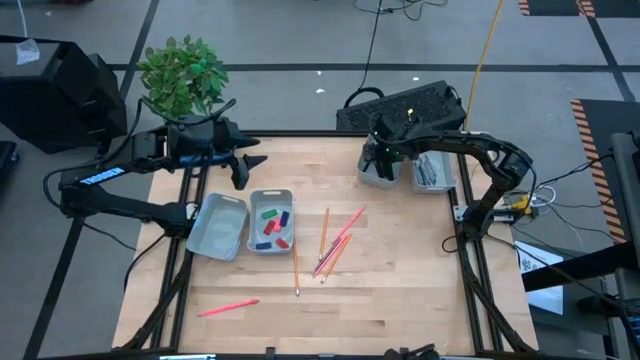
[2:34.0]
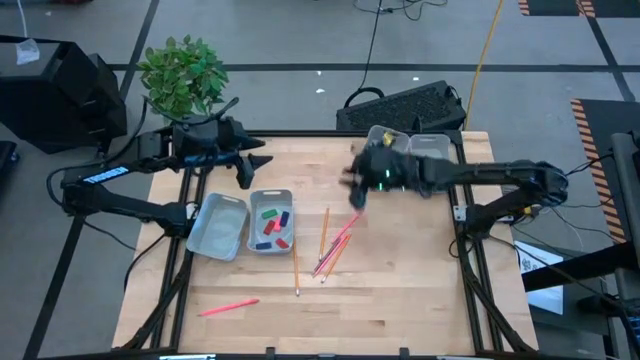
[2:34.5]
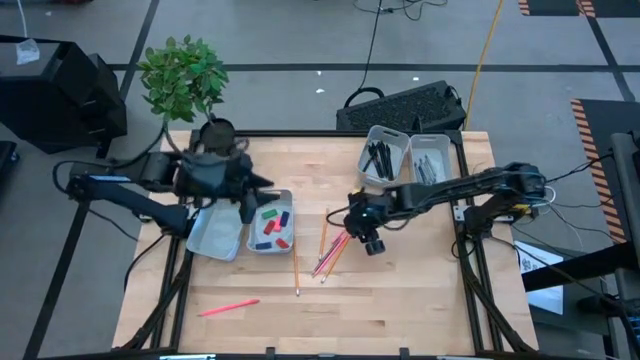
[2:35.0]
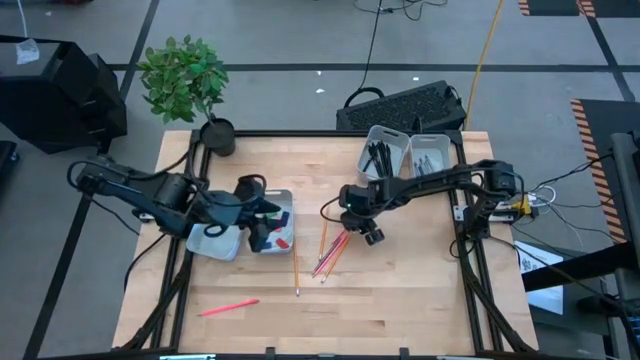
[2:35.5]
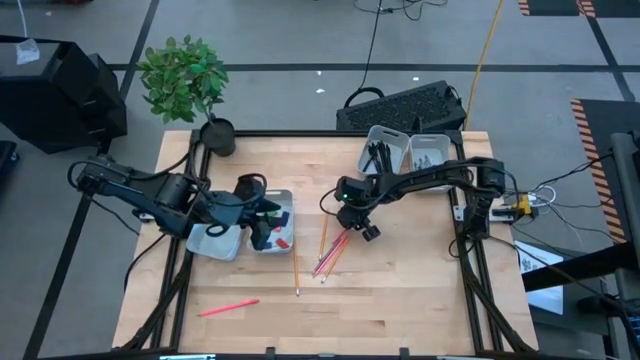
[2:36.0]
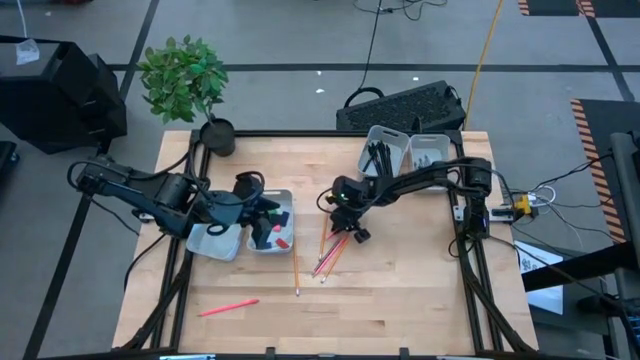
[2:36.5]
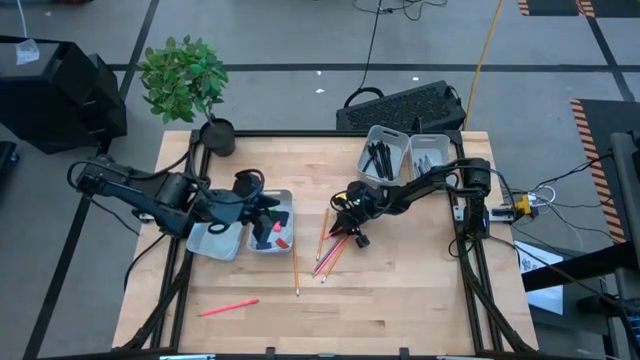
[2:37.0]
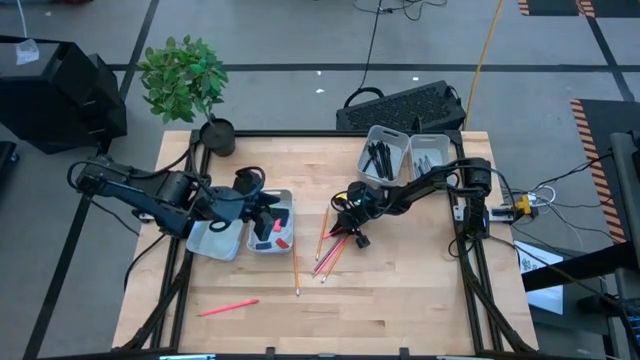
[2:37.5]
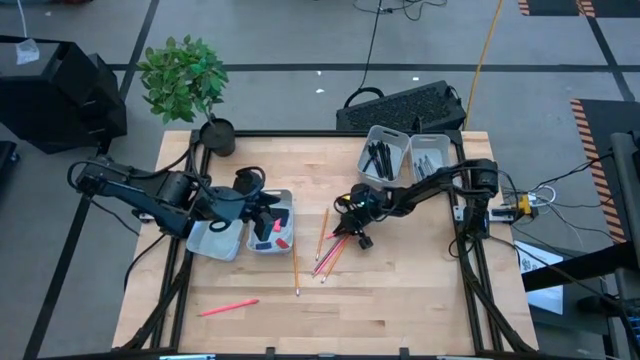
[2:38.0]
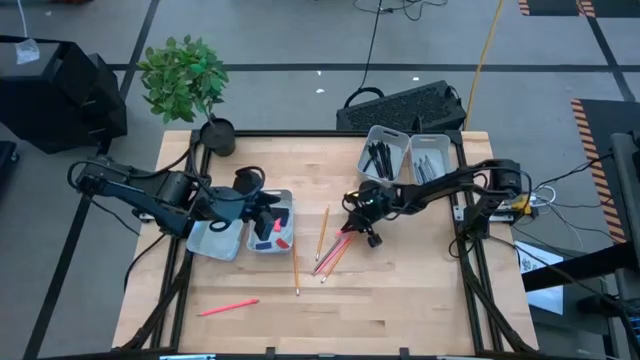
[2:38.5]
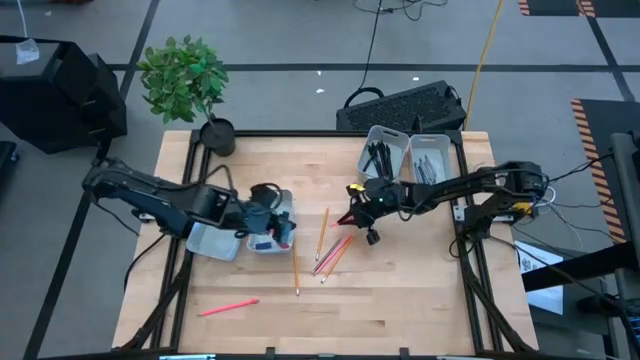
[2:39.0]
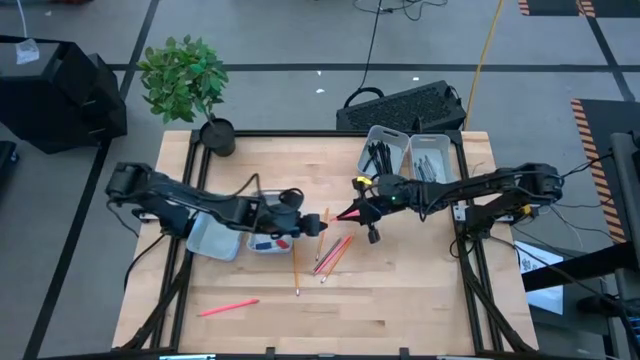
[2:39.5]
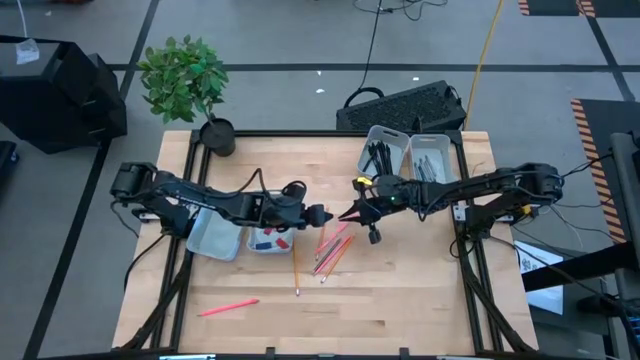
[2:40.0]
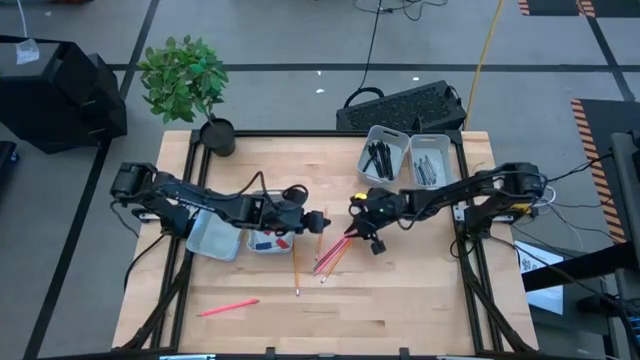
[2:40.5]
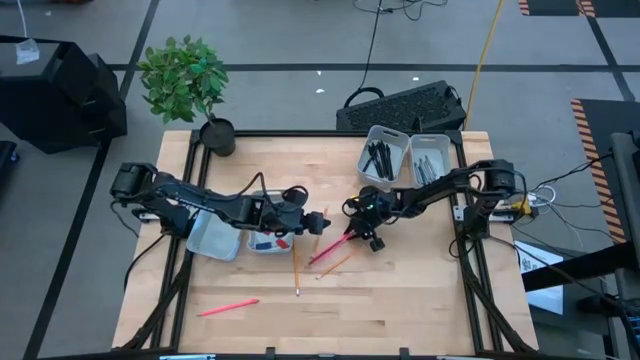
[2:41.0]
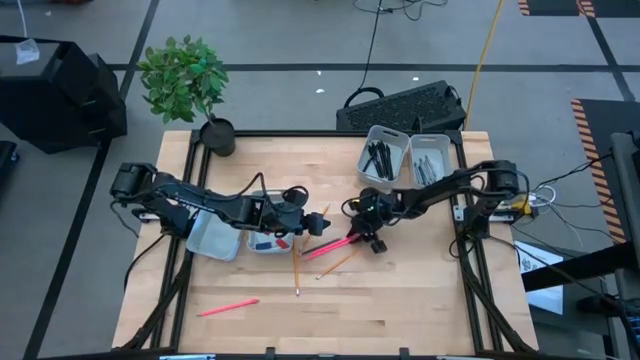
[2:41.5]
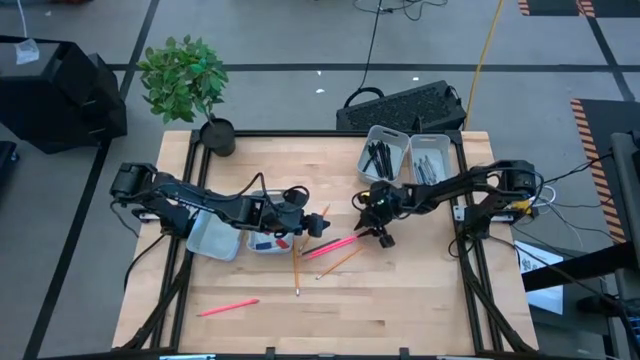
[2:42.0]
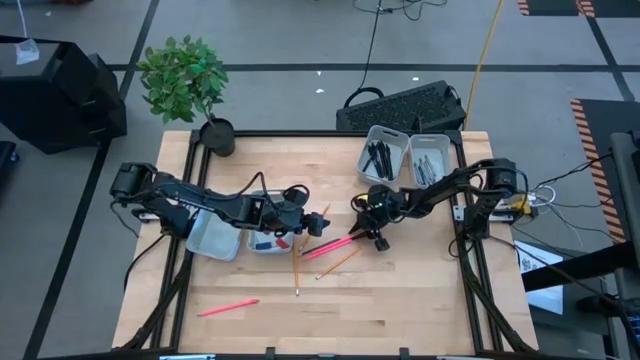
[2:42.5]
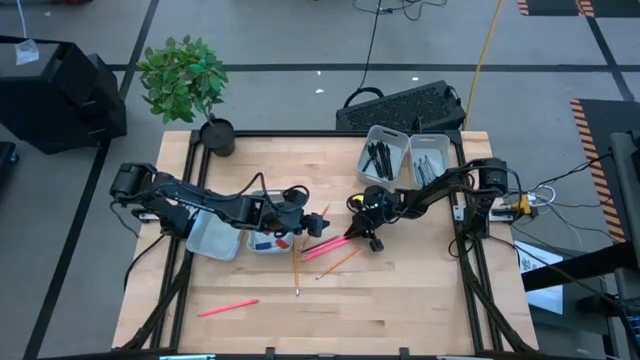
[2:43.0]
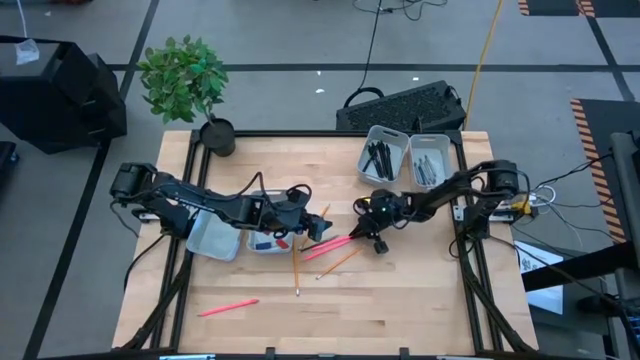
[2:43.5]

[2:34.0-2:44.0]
Task: Sort crayons/erasers/pens/pencils in bins
Put the pink pencil into the bottom left gray bin

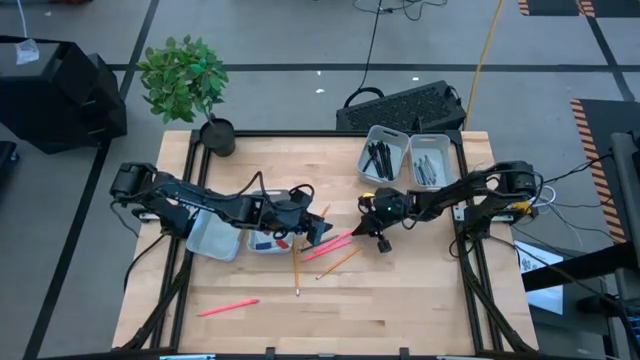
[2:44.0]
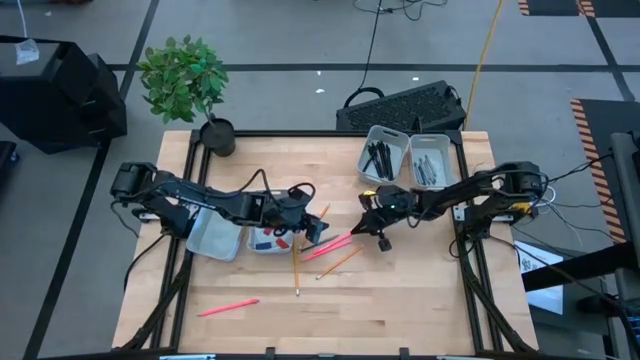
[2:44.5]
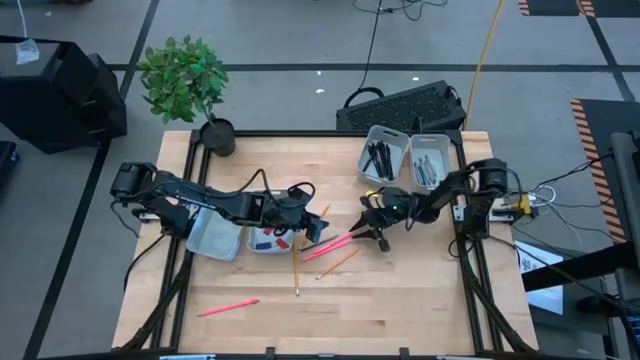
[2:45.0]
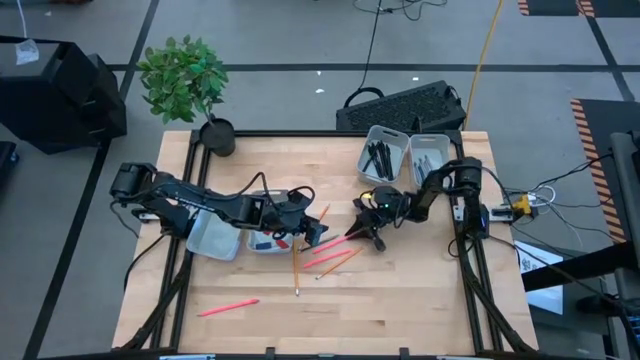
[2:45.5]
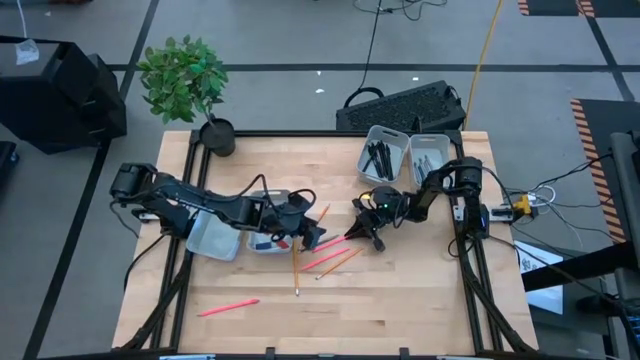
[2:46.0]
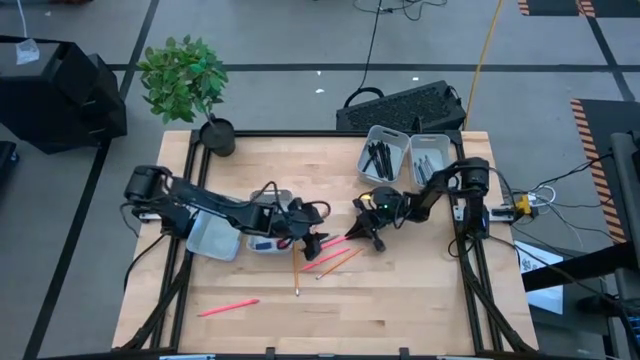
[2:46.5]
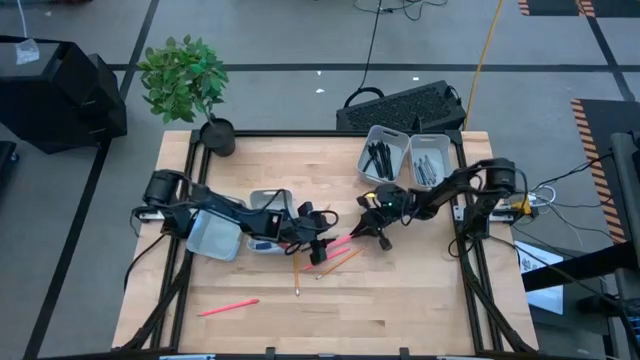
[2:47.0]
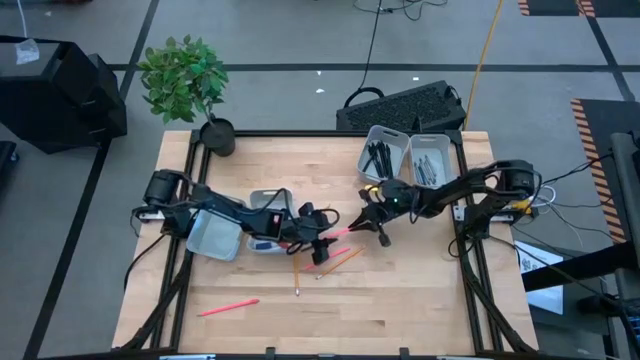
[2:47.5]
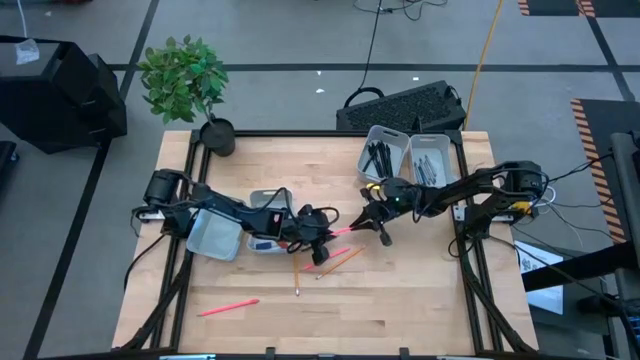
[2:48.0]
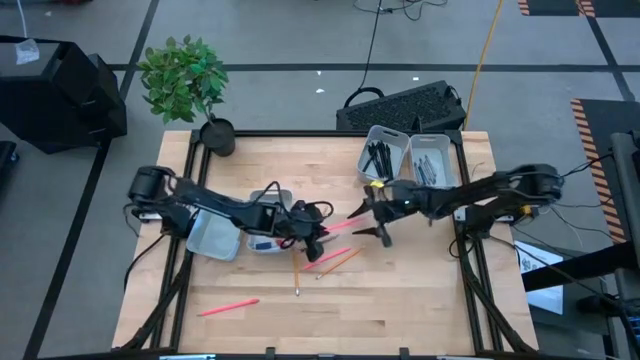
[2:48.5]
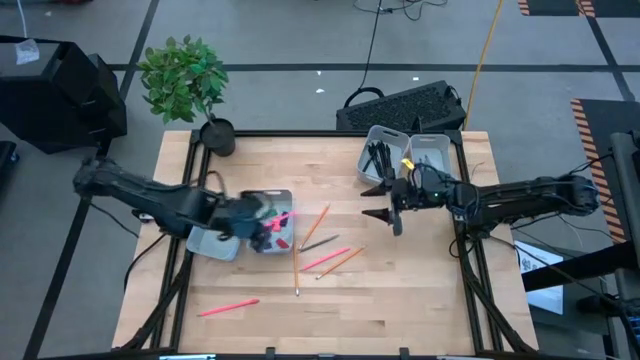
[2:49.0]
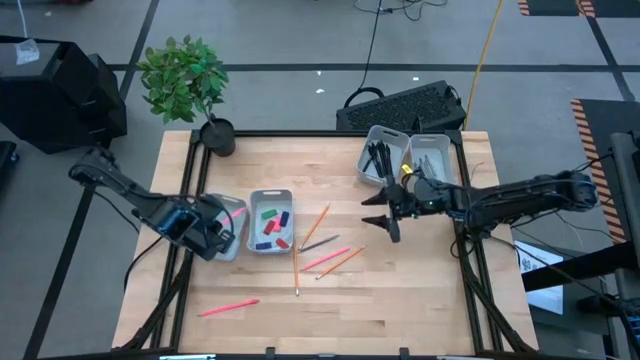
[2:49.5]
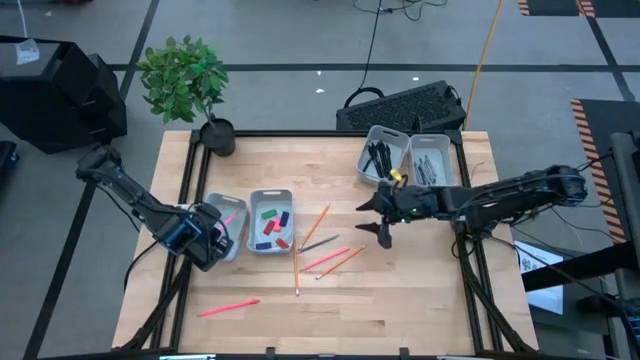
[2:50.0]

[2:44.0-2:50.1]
Put the pink pencil into the bottom left gray bin

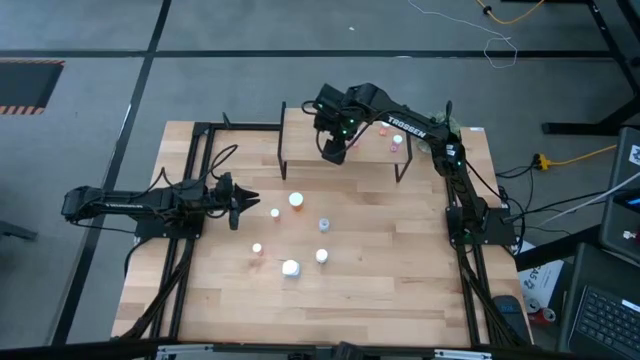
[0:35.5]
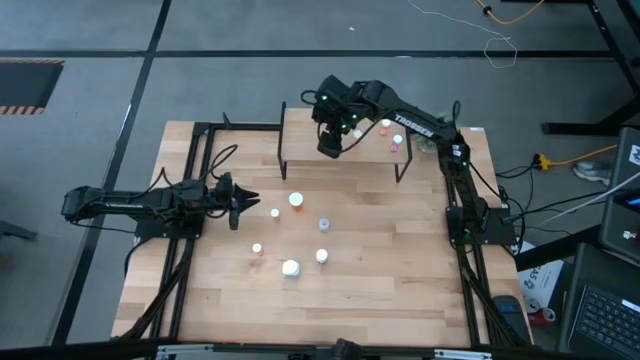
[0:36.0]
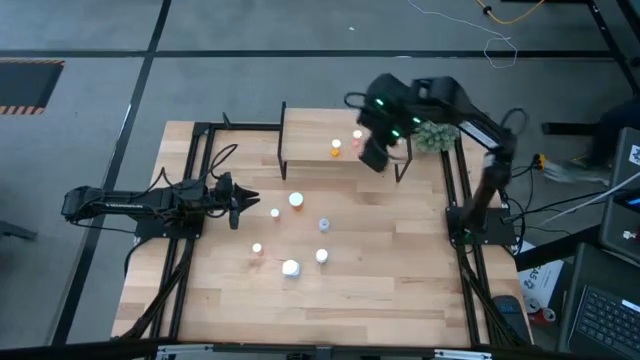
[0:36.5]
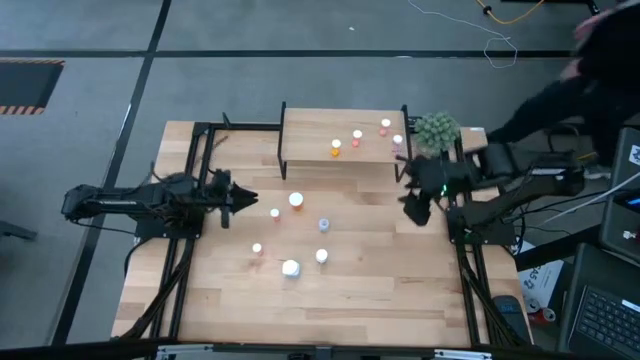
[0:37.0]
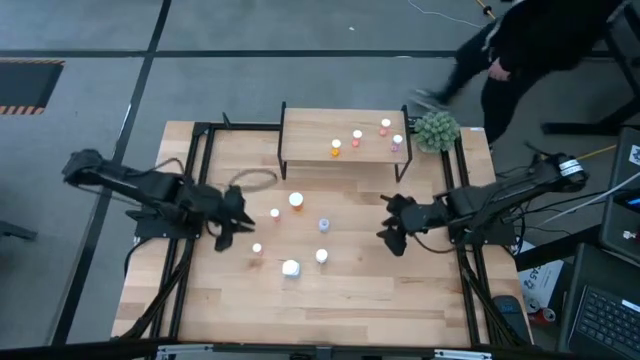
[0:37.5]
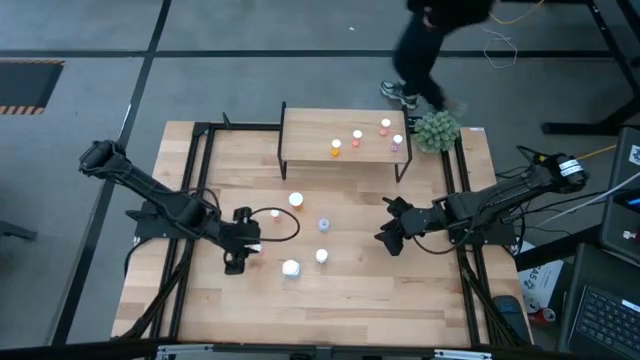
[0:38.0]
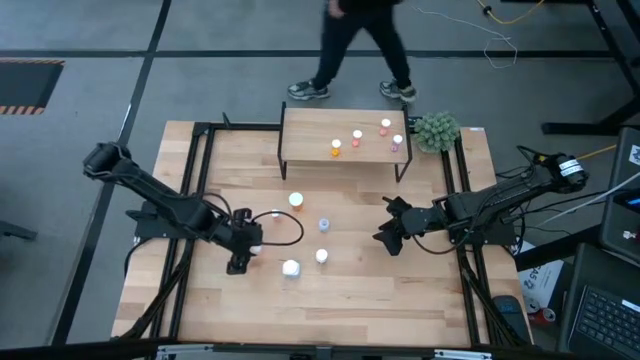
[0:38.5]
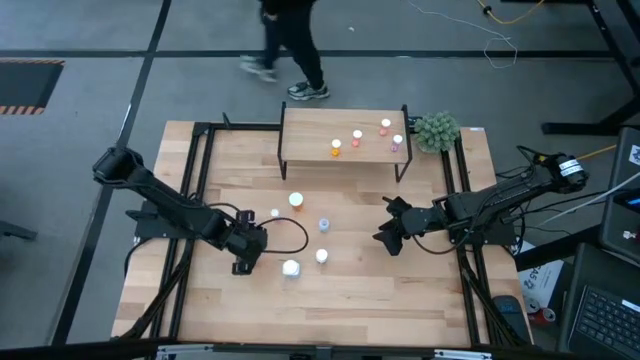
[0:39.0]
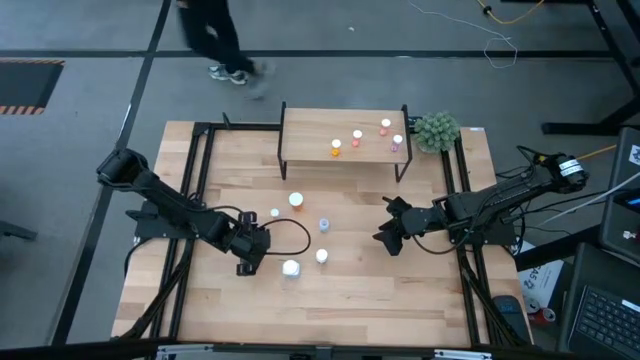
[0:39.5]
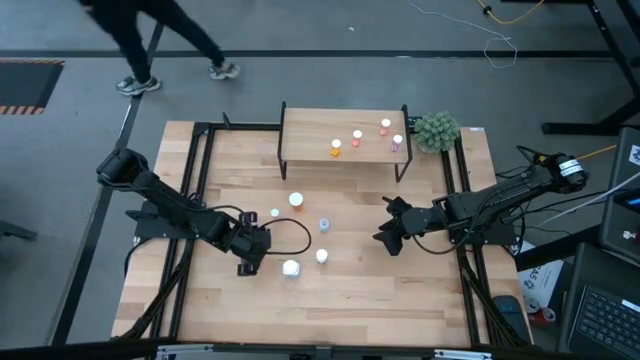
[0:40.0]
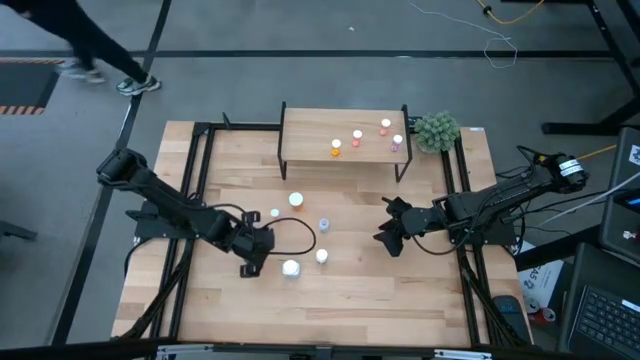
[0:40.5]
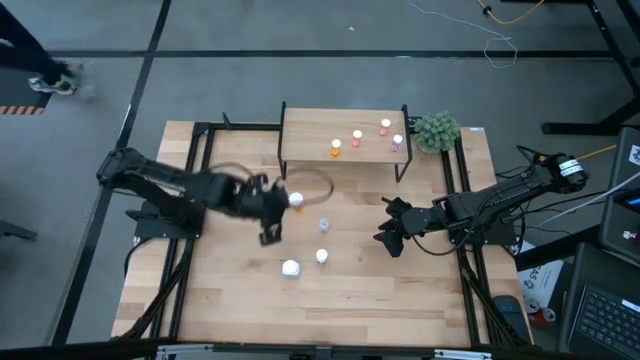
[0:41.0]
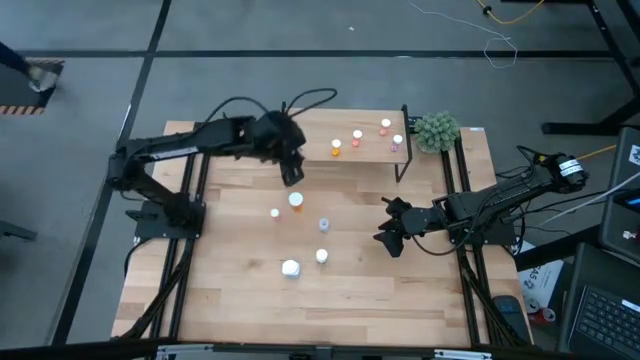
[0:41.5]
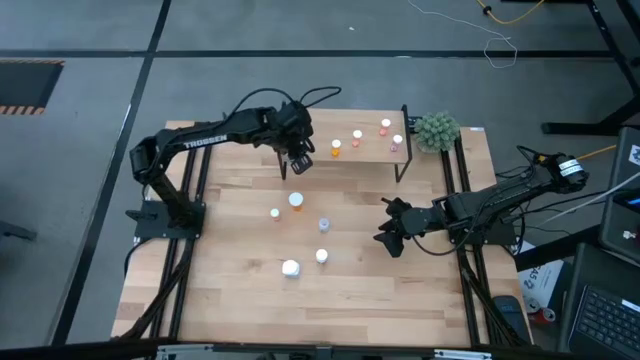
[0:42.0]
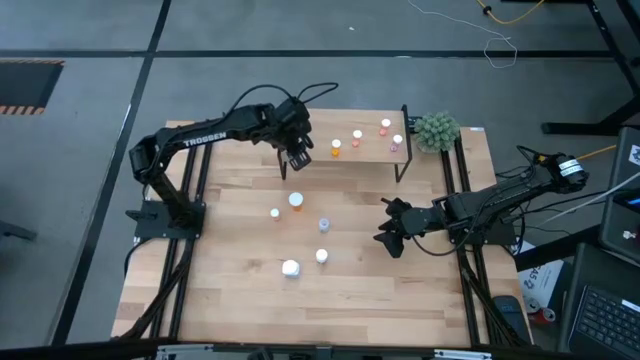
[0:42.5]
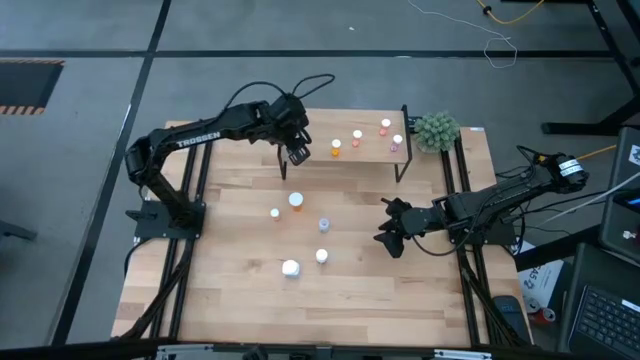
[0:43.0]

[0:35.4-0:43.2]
Task: Pick and place medicine bottles onto shelf by color
Put the orange pill bottle on the shelf
